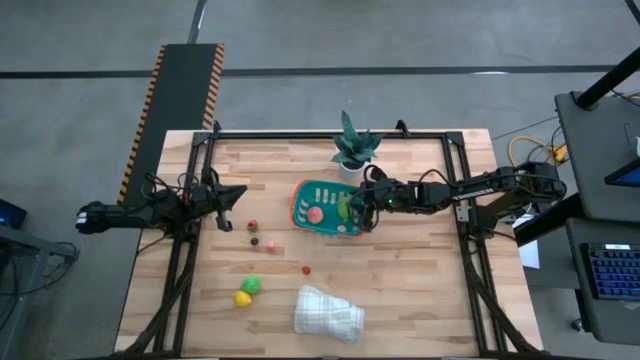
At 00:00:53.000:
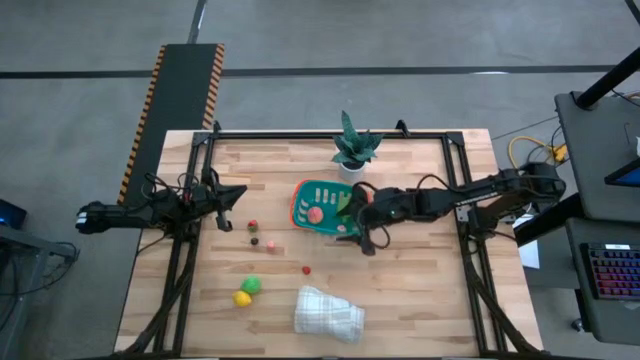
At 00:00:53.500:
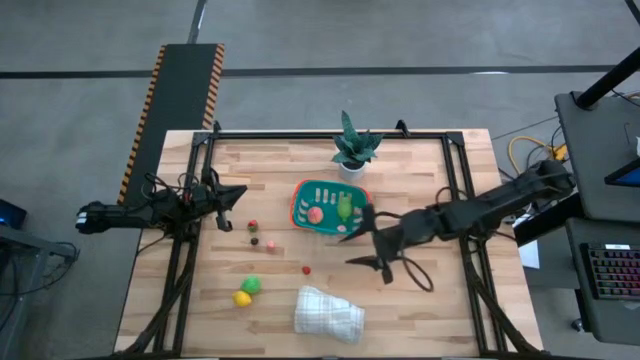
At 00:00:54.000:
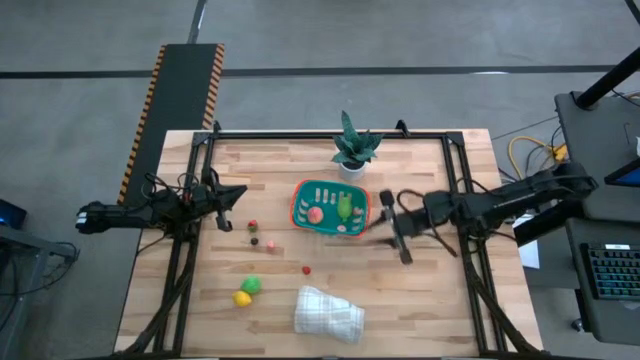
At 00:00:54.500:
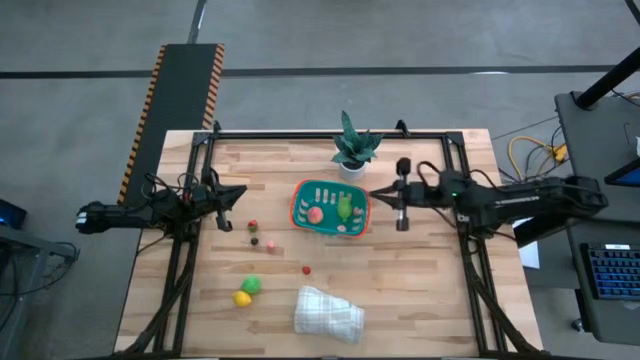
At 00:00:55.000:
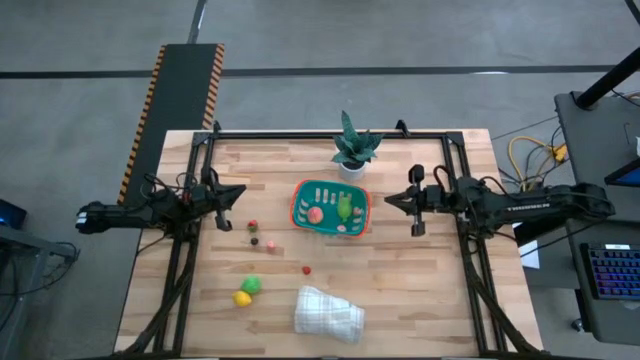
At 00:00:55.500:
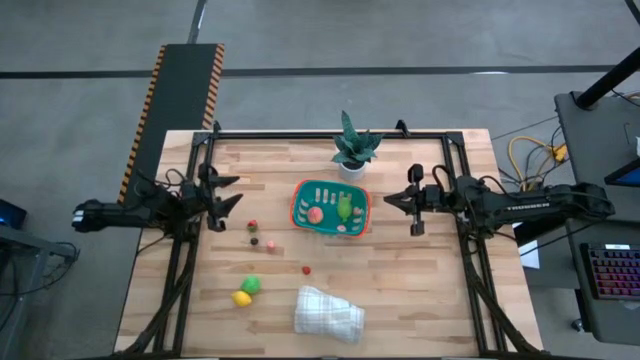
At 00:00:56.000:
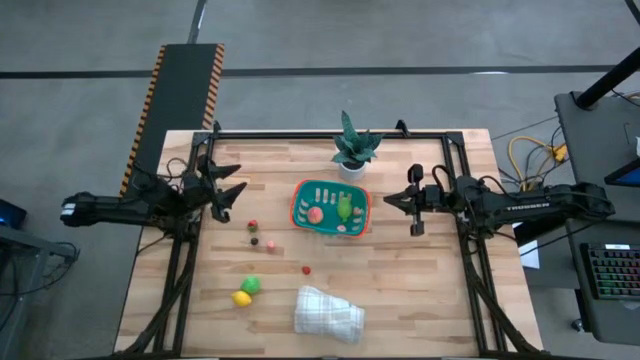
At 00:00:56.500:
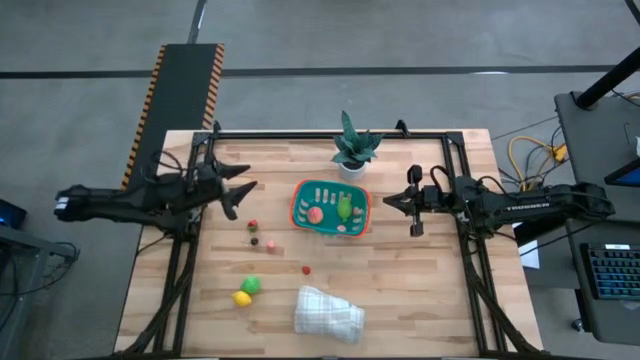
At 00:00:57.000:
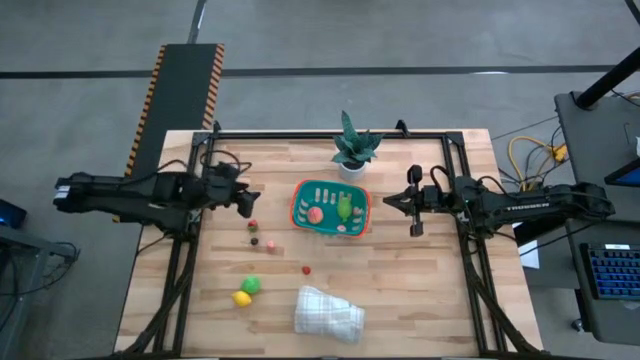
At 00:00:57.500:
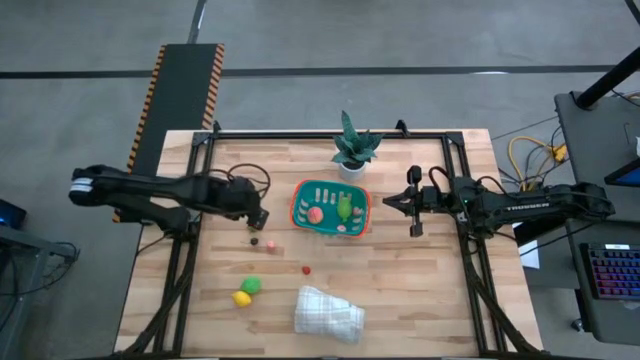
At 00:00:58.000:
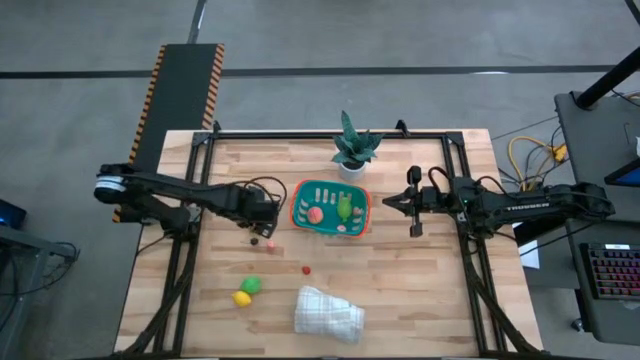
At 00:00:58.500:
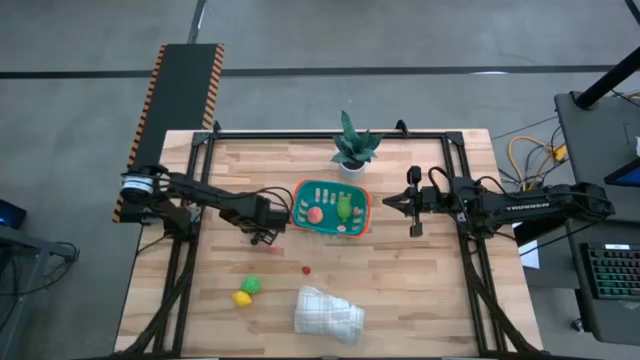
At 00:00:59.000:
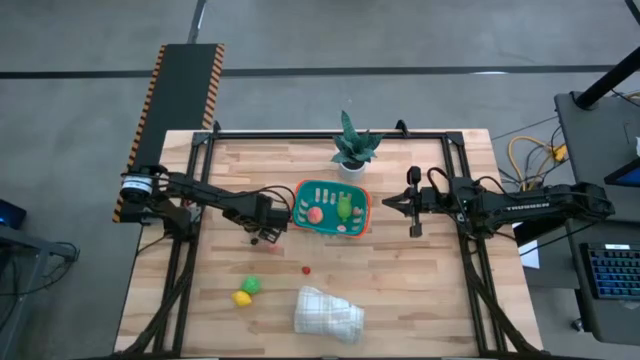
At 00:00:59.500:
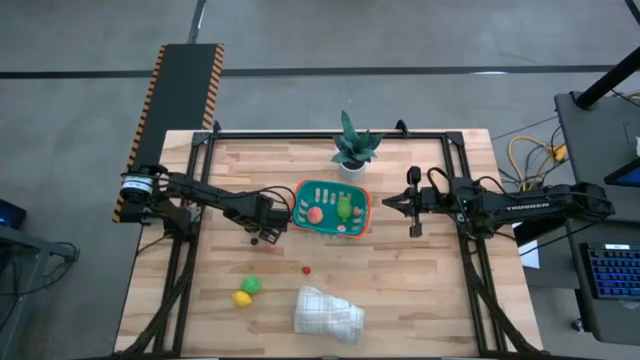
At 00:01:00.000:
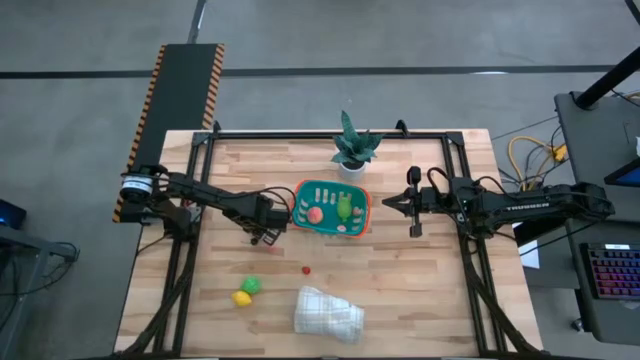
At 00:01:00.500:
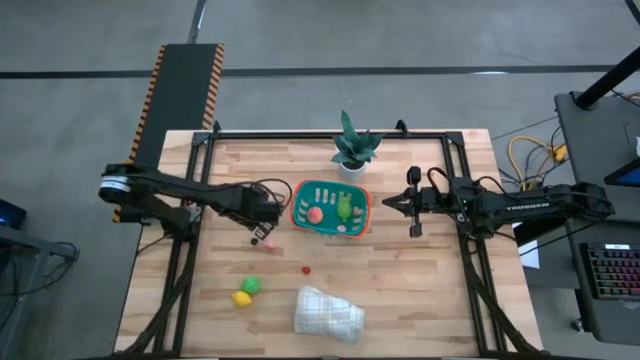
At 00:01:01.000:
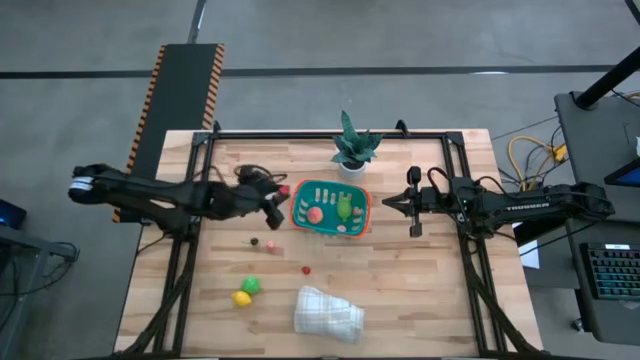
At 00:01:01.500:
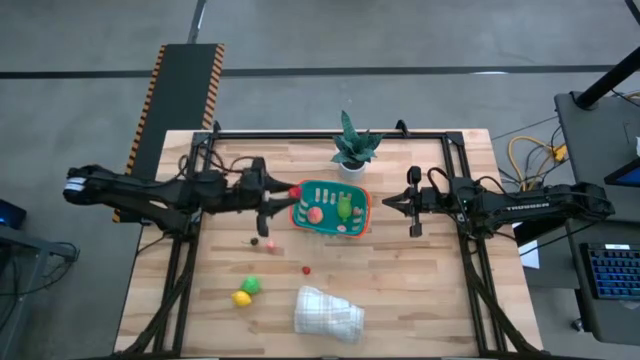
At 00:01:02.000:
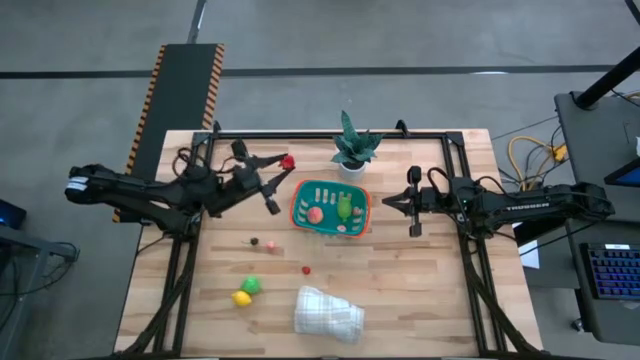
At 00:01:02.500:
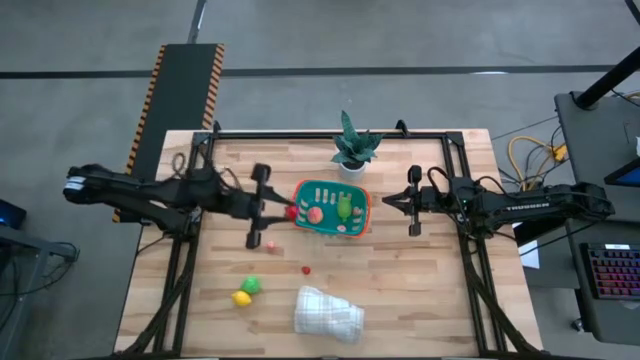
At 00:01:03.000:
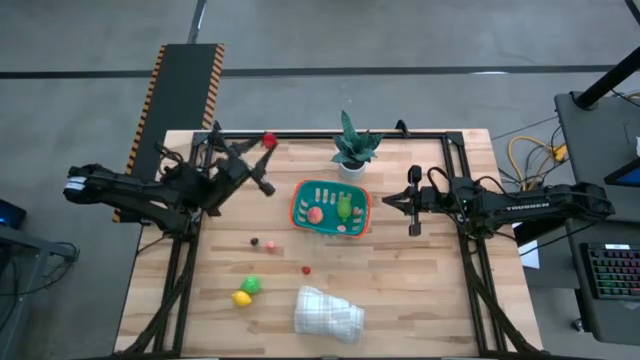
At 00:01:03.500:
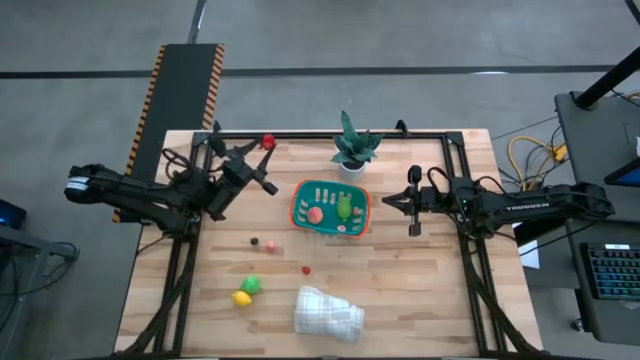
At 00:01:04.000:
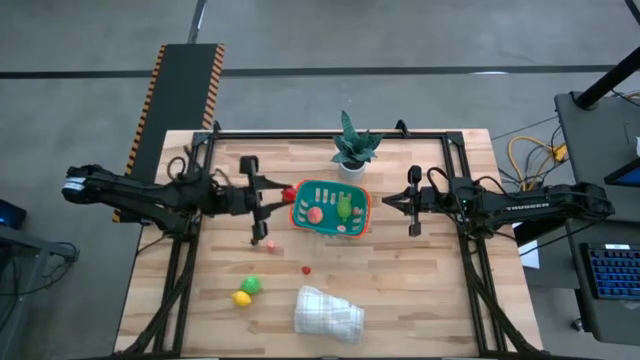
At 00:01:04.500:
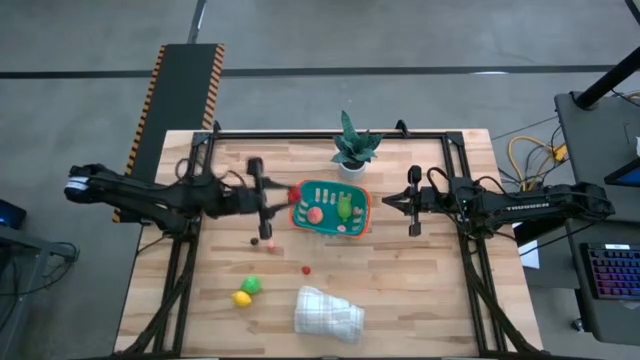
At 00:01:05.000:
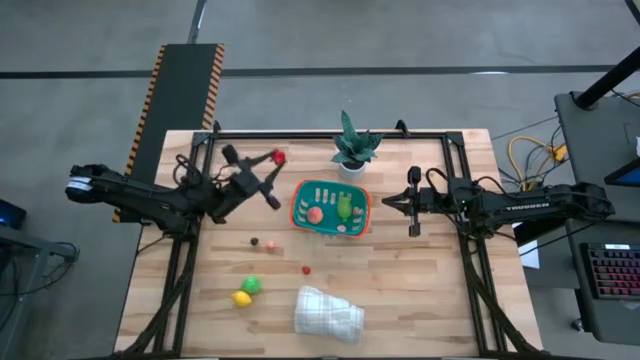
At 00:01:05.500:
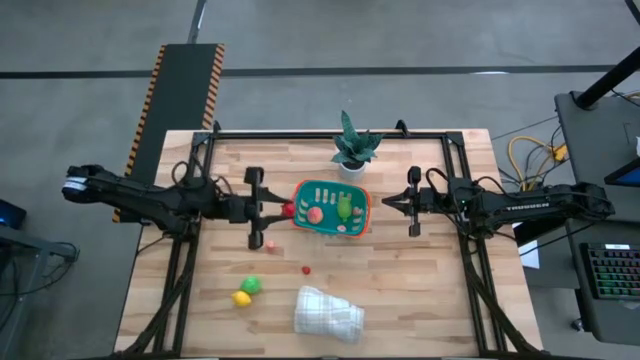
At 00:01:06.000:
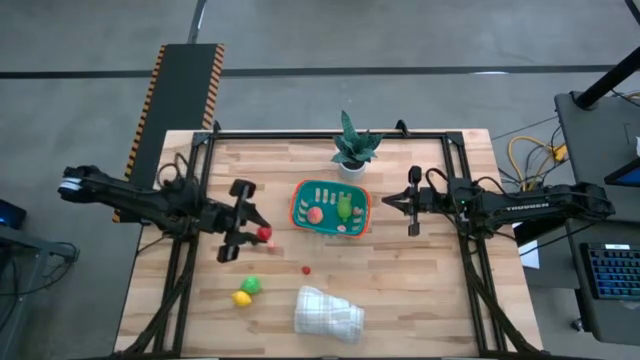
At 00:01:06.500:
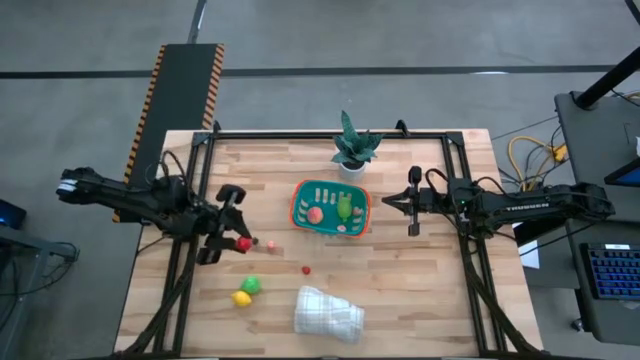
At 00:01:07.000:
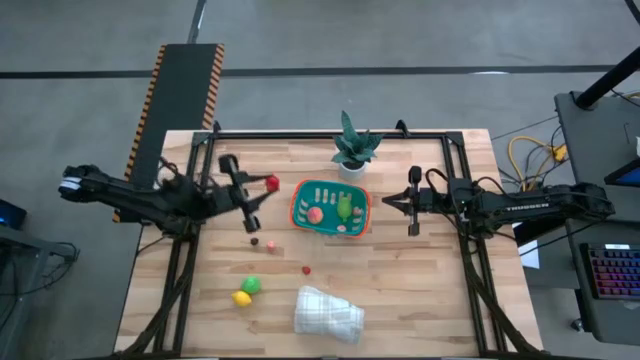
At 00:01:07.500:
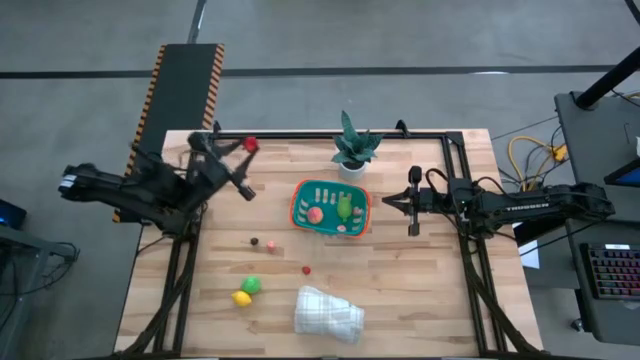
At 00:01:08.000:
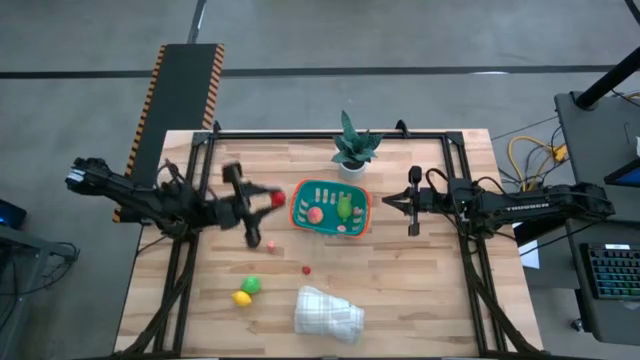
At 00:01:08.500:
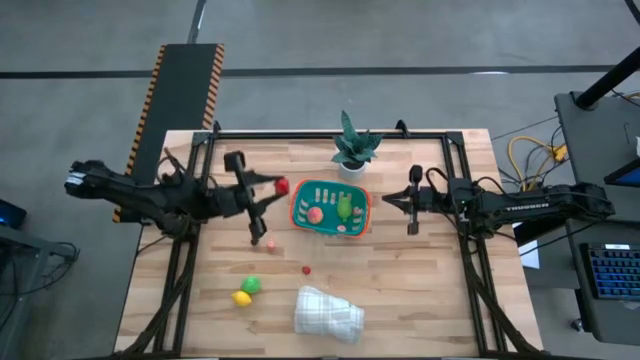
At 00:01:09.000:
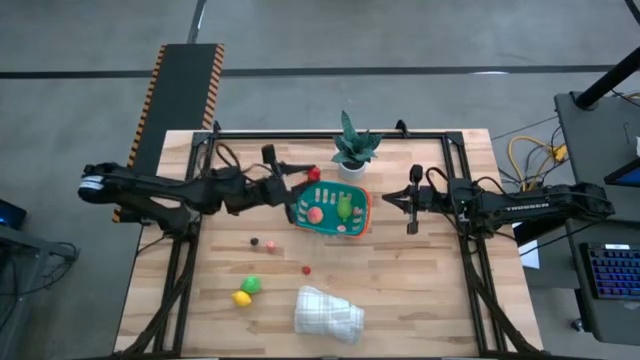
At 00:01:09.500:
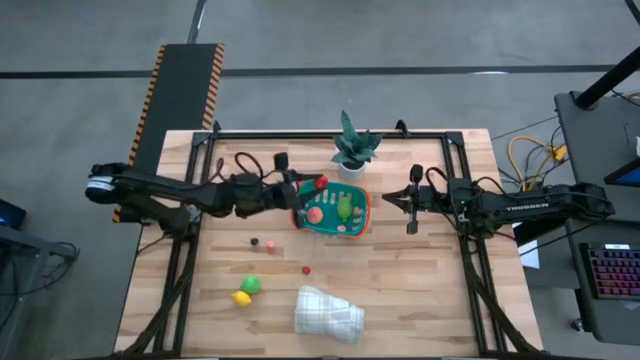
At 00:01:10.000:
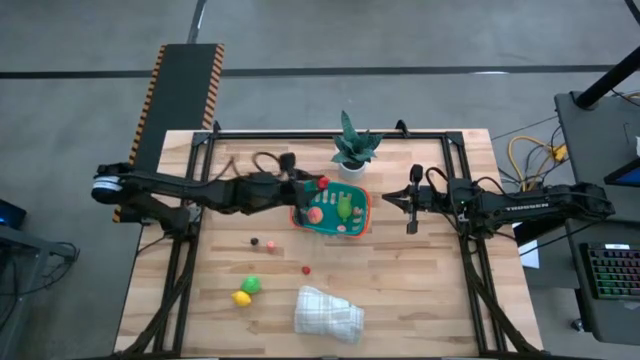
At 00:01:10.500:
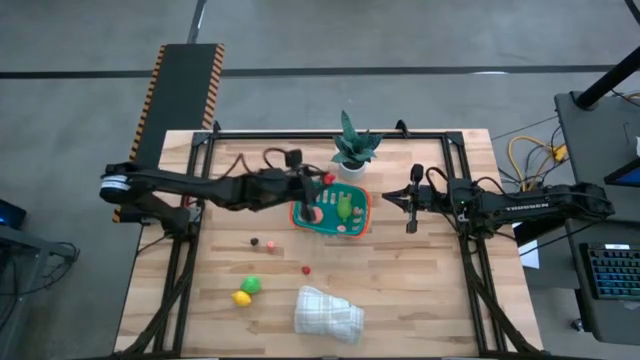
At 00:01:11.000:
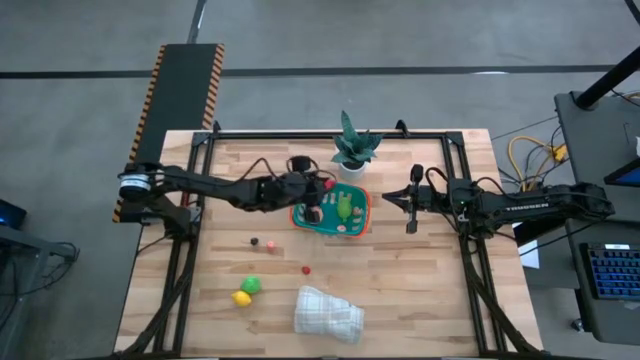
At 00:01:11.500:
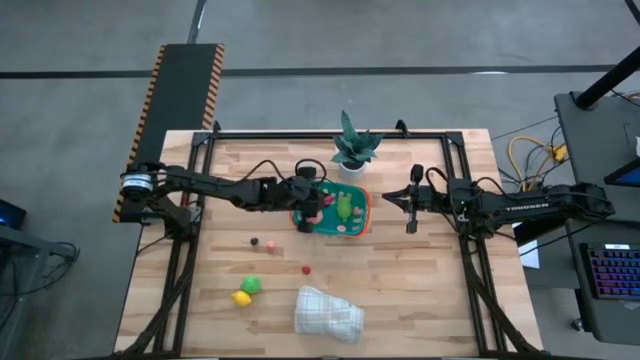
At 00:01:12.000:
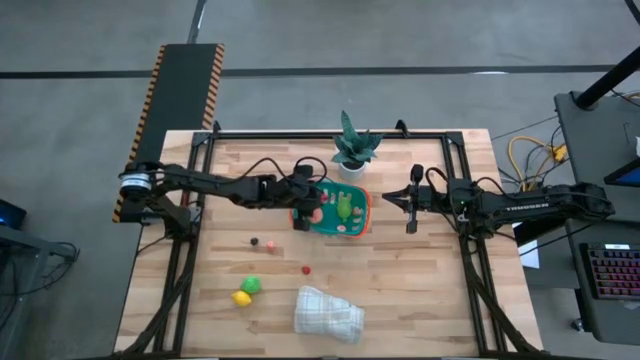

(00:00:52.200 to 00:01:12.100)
Task: Build produce basket
Put the red strawberry into the blue basket
